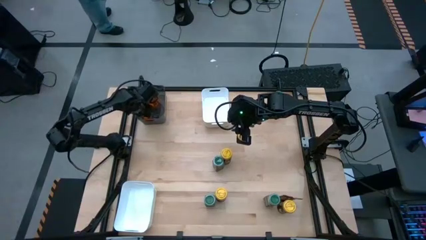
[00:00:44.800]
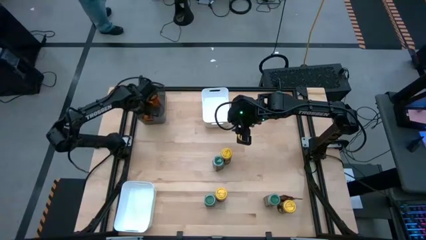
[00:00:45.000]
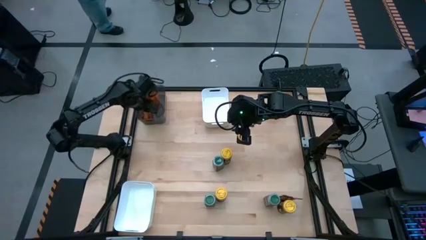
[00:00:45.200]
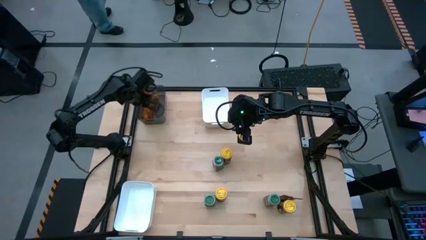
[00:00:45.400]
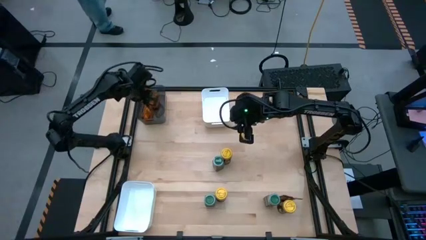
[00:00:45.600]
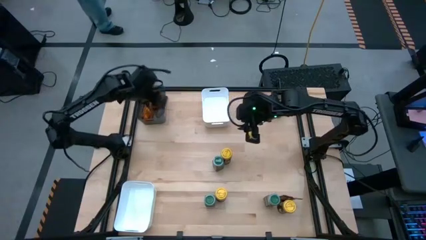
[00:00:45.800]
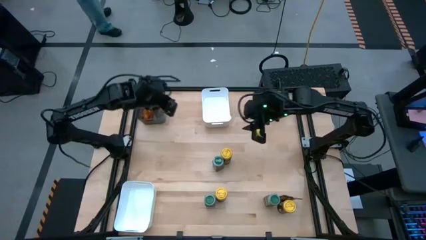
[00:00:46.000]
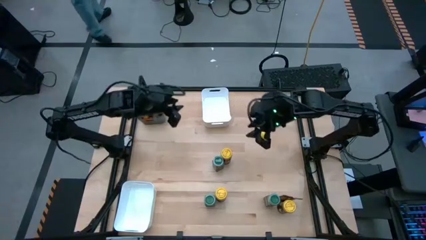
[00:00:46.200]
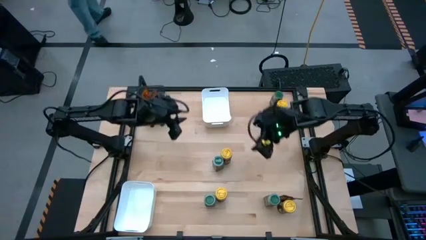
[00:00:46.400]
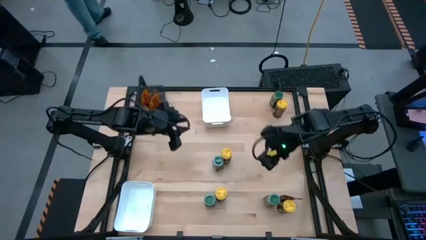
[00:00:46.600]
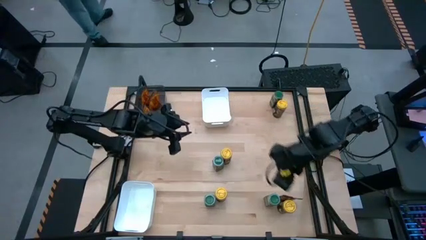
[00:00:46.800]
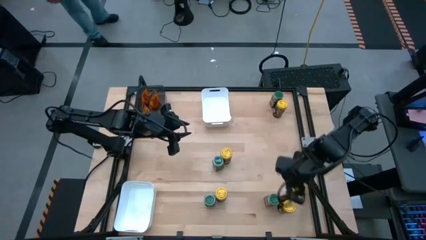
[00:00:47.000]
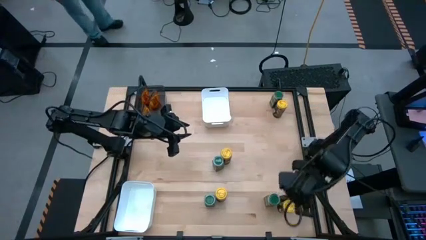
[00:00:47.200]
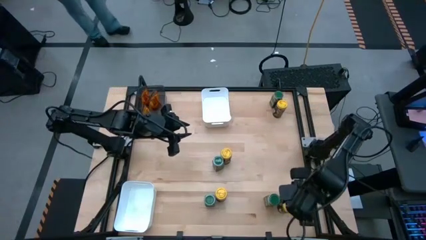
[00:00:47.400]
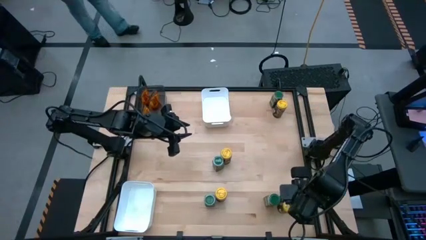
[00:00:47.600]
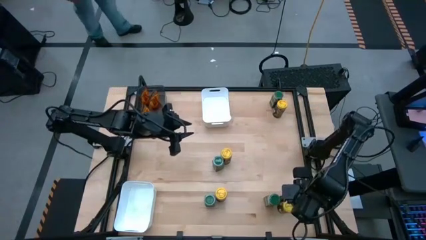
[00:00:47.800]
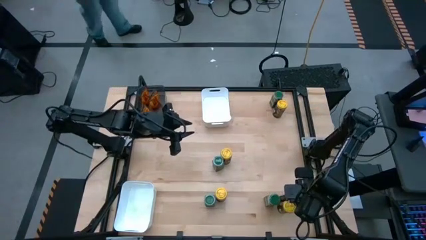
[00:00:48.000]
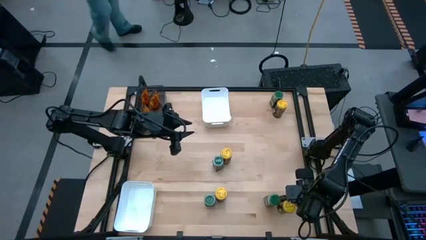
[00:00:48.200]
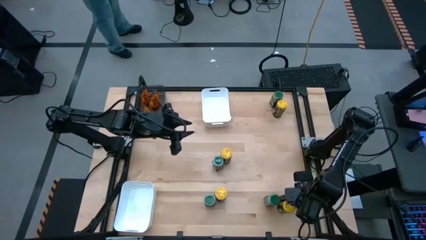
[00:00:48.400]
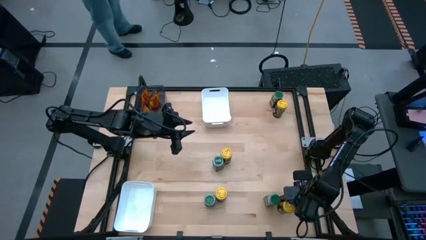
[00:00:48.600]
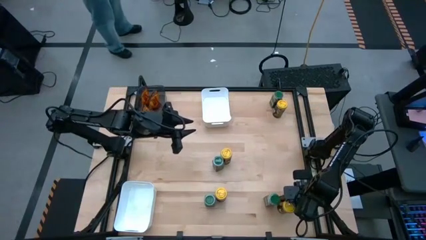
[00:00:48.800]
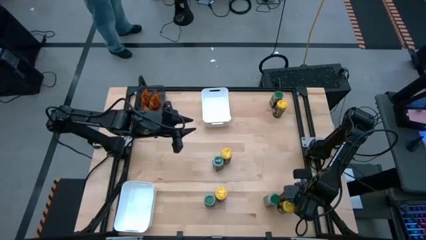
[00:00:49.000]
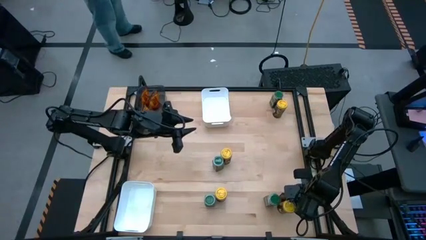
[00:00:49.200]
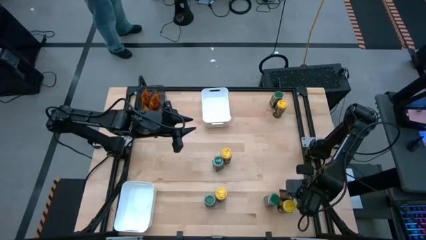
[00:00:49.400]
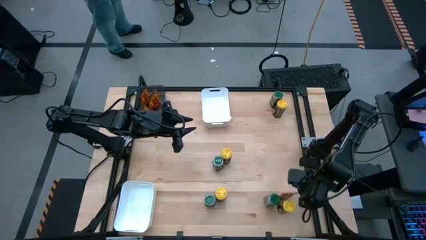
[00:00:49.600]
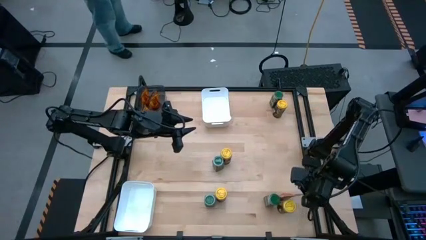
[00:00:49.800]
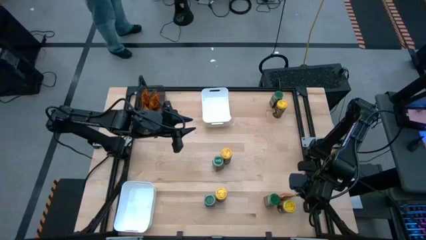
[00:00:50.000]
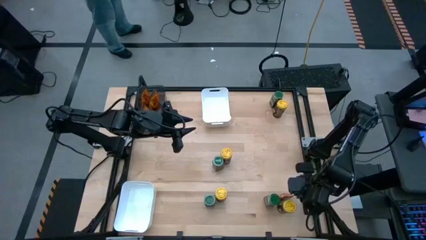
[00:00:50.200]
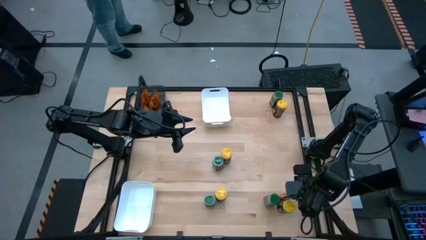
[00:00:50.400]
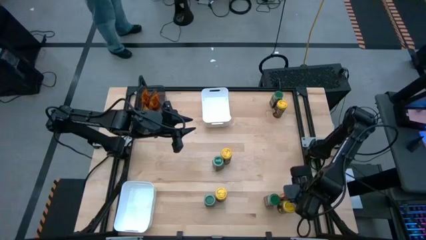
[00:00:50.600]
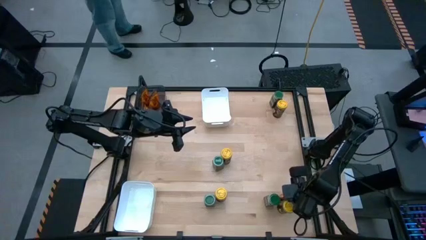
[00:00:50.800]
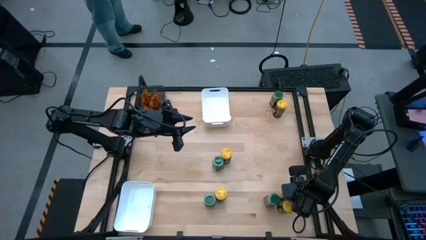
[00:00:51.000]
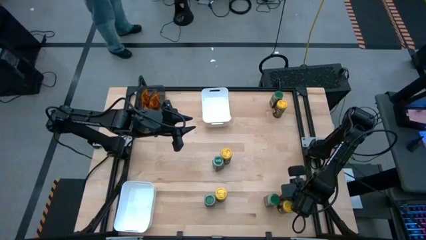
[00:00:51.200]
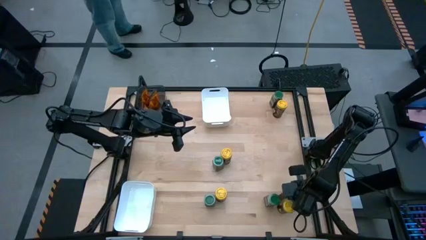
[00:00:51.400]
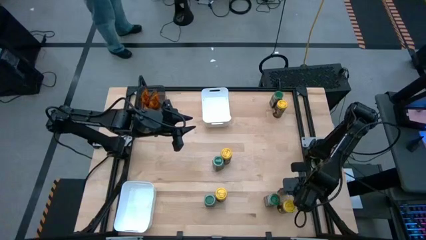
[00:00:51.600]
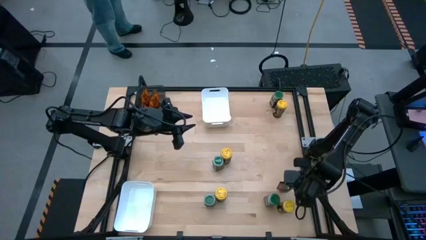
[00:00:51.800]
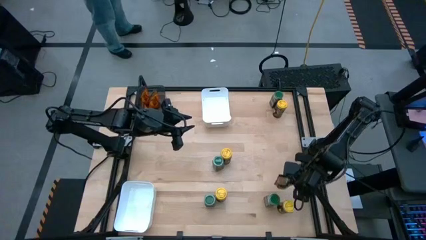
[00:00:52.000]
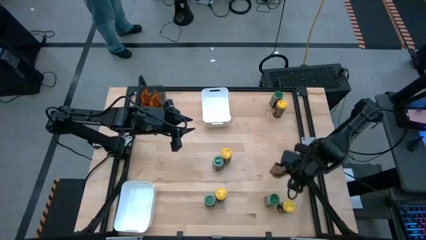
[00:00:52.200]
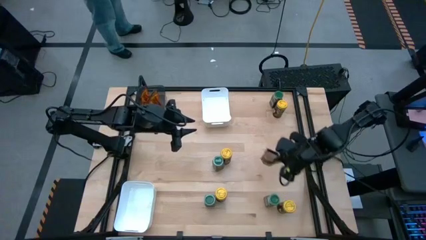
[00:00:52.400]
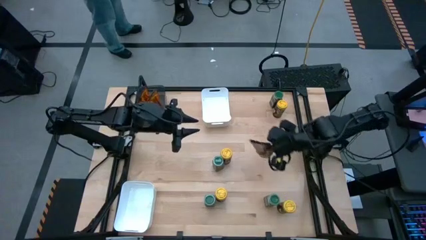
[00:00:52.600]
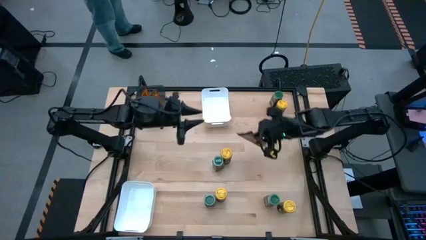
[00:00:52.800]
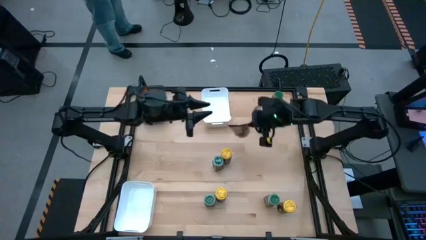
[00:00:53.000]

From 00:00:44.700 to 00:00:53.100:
Task: Sort spices by type
Put the orange seasoning pack into the black bin

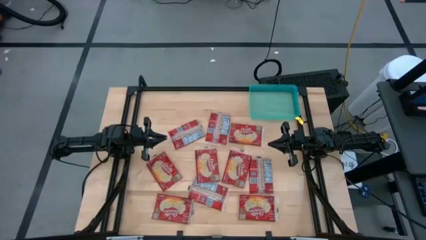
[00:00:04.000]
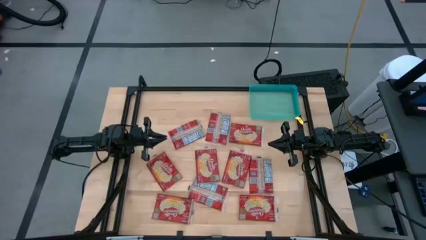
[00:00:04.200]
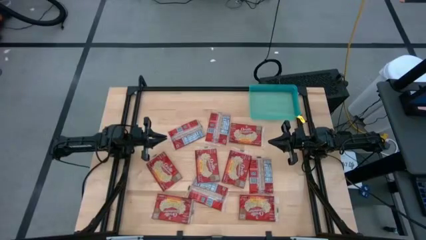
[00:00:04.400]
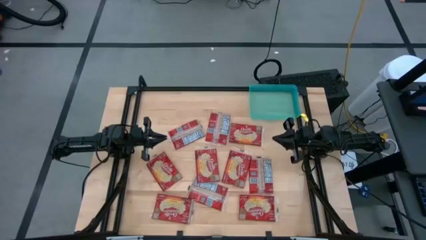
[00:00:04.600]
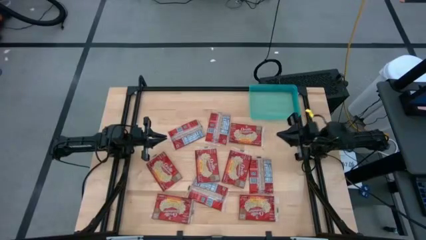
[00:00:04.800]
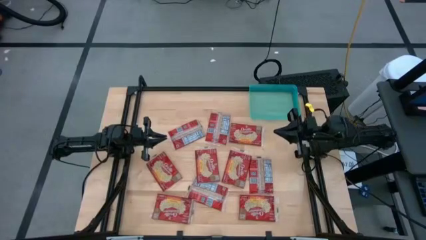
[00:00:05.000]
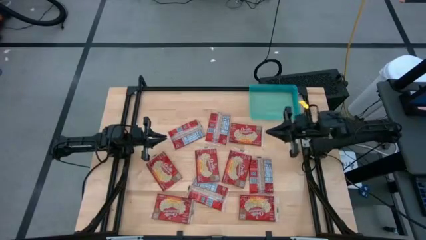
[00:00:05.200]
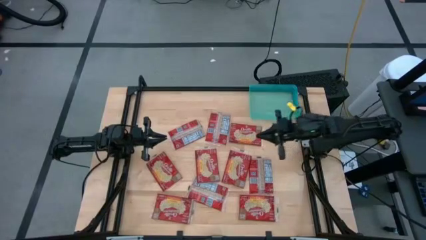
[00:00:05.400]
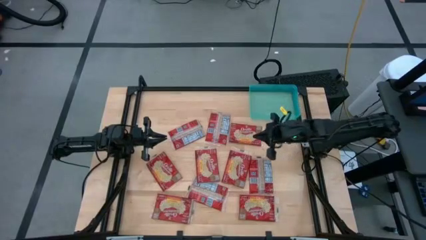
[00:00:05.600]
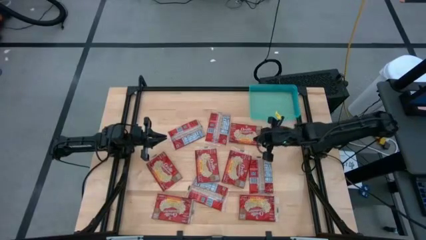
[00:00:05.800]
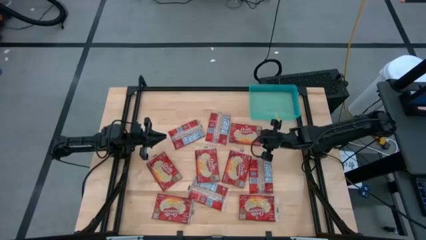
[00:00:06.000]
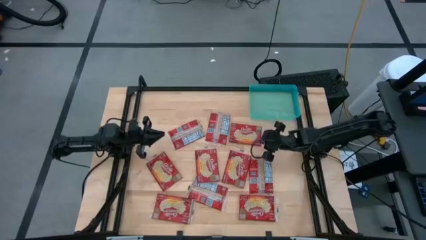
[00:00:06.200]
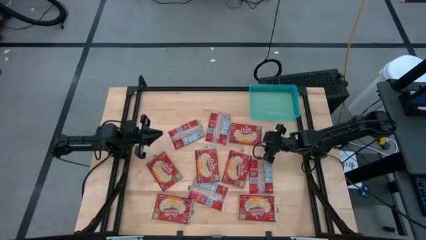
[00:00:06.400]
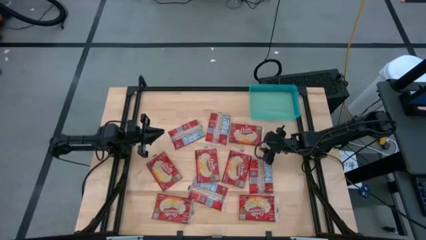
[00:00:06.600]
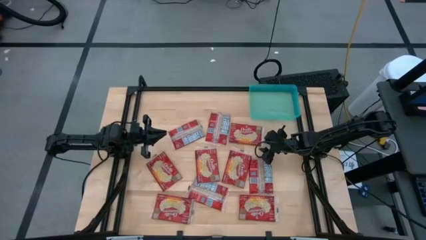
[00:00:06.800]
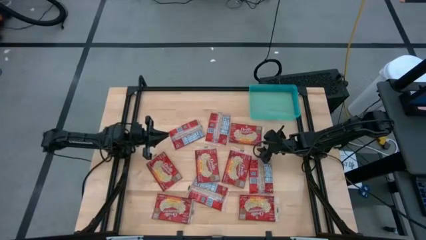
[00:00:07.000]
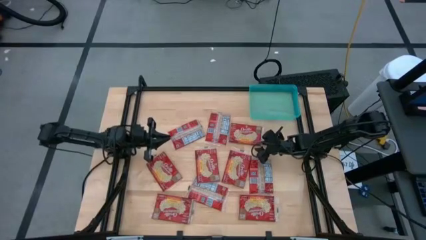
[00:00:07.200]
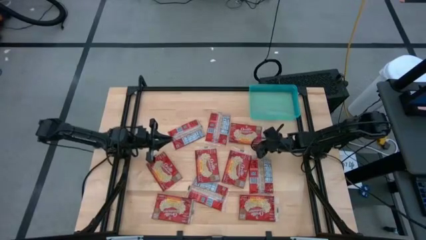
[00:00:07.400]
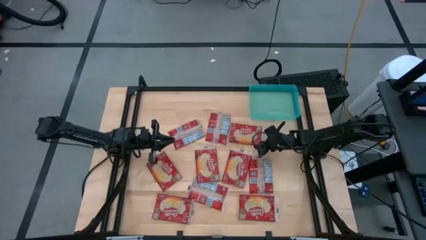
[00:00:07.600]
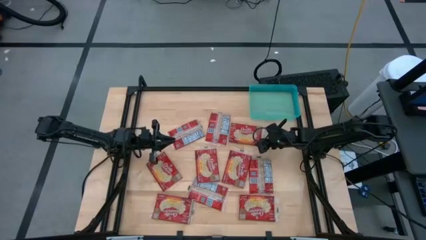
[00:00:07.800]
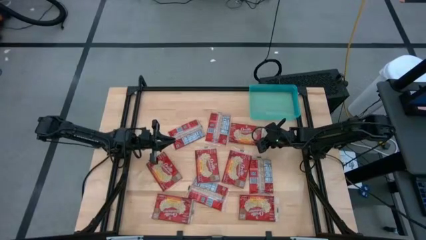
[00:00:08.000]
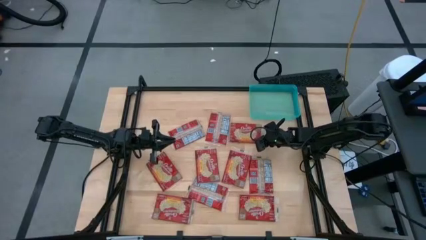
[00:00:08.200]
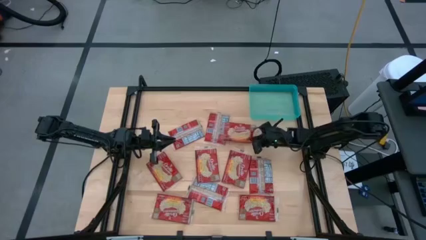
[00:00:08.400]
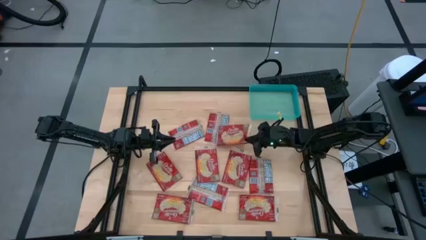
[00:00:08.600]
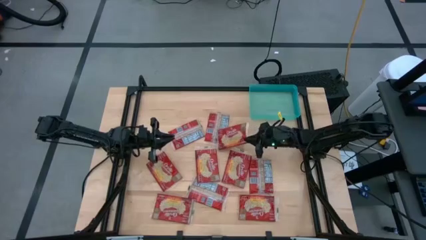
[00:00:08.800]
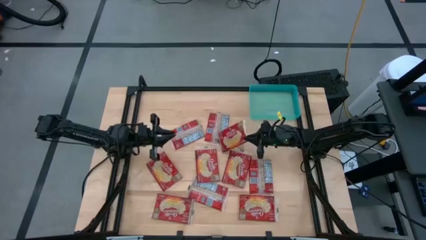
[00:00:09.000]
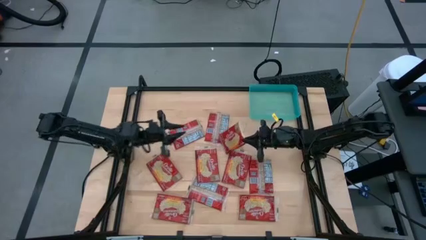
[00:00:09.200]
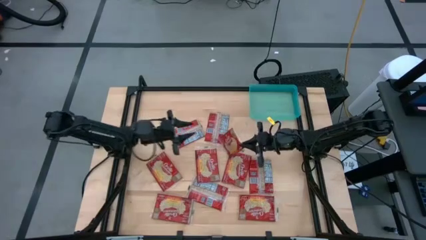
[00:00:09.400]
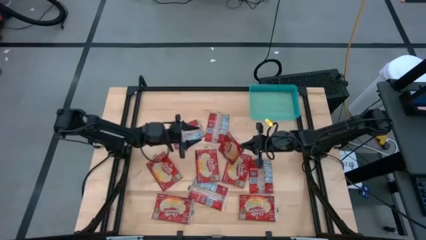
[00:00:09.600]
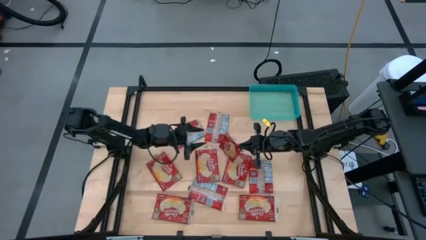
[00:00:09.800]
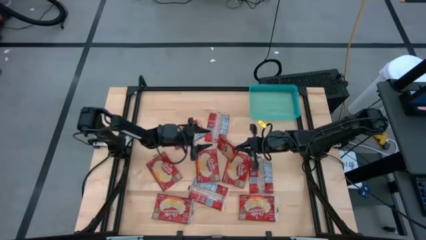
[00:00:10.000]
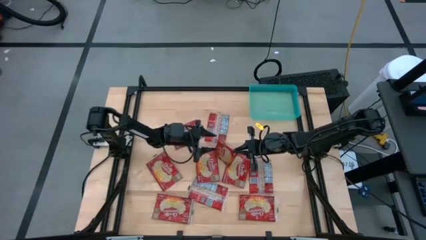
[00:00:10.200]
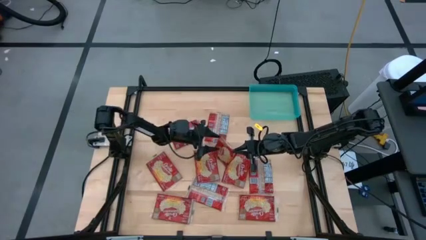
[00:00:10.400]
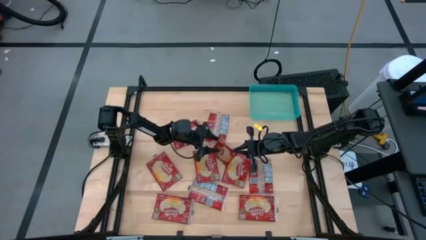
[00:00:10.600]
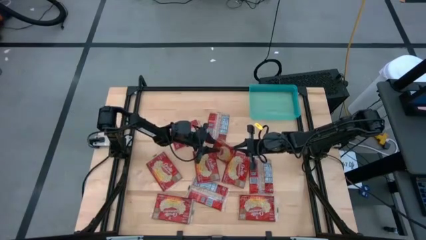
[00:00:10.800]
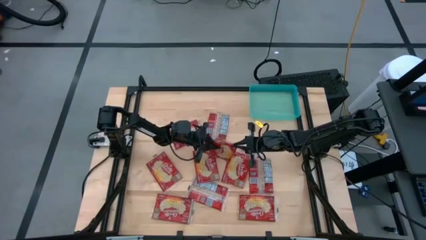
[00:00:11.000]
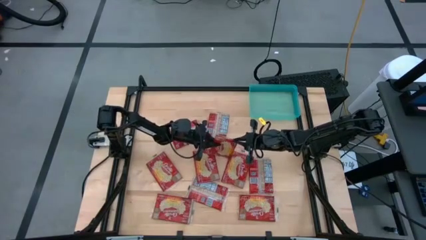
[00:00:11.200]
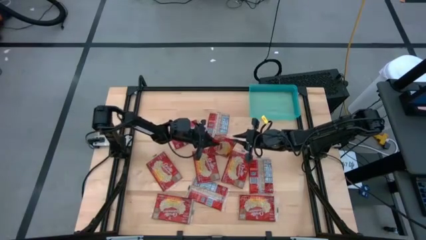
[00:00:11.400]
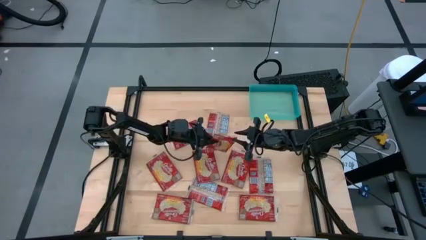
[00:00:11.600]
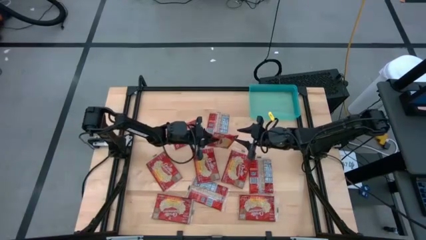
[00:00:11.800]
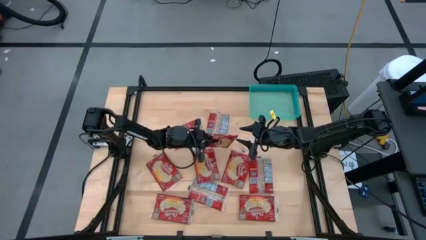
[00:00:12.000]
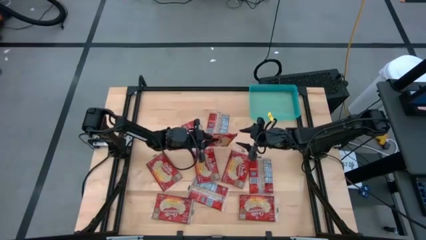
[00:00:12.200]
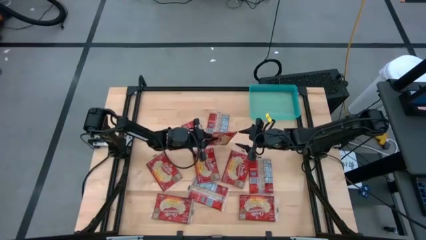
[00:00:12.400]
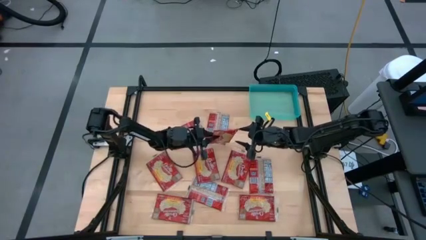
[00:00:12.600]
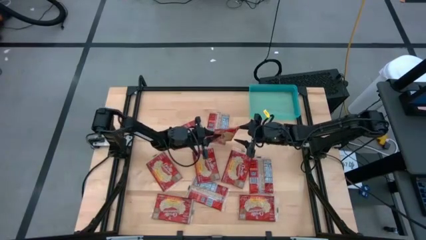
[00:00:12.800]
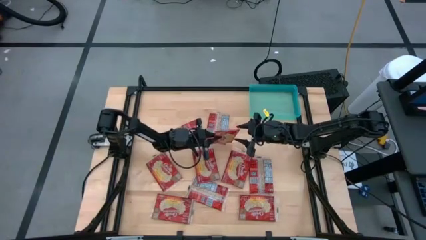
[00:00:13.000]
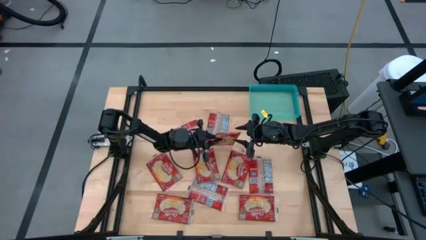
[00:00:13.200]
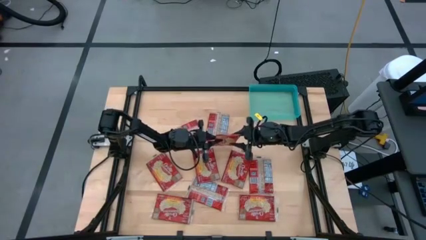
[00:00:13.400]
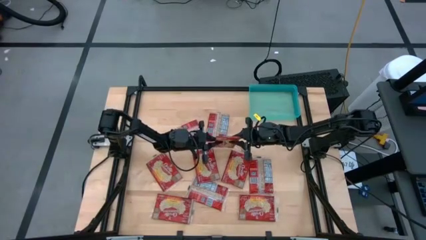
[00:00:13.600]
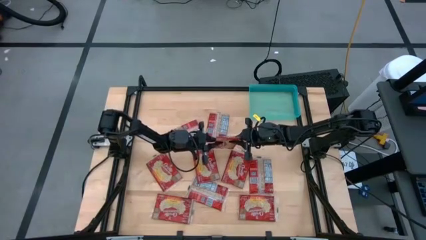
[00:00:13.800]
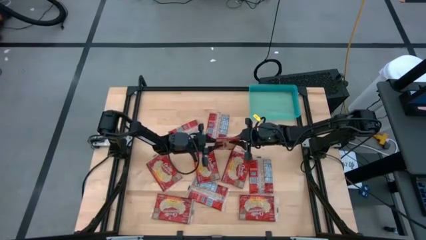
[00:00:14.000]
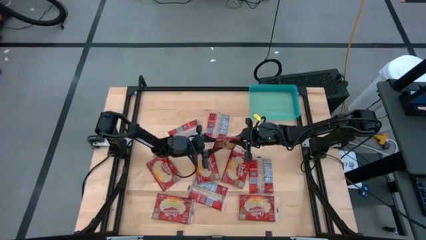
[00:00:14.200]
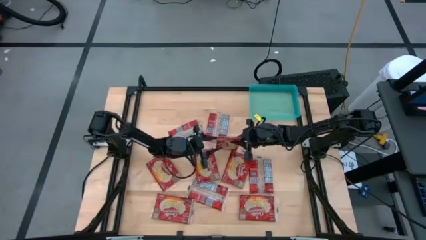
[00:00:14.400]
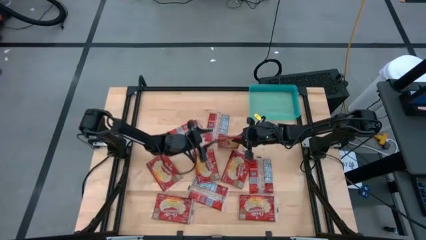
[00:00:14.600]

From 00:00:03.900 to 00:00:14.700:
Task: Sort popcorn bags into baskets
Put the red popcorn bag into the light blue bin
